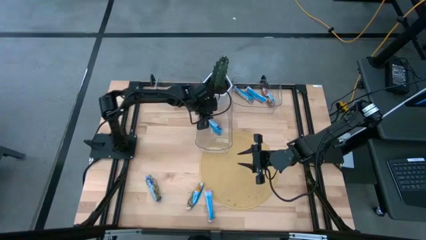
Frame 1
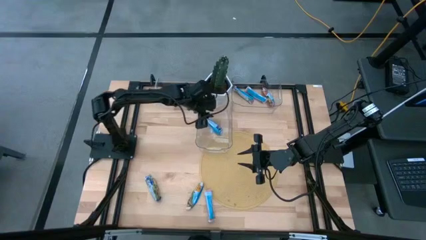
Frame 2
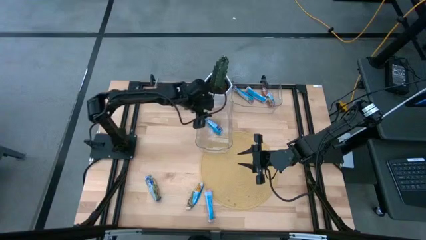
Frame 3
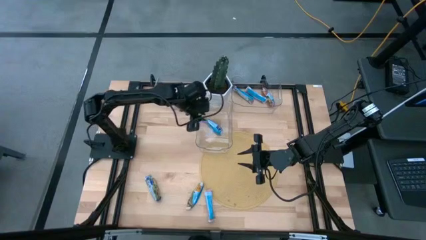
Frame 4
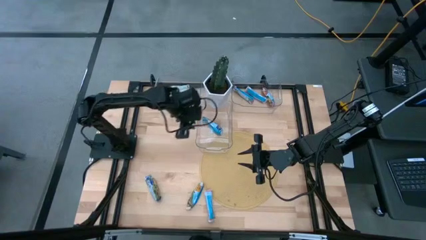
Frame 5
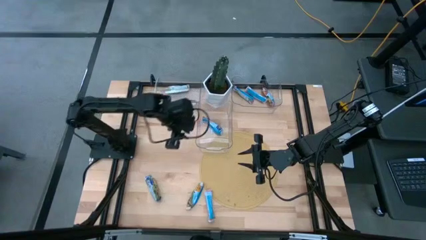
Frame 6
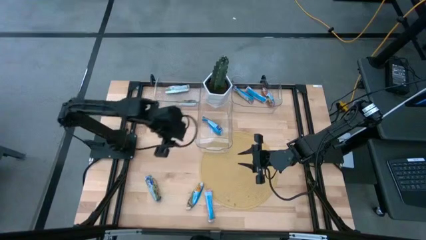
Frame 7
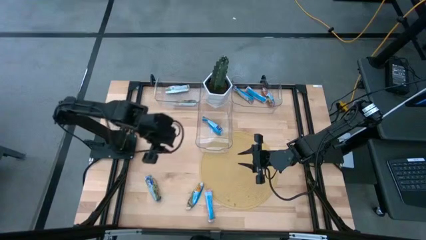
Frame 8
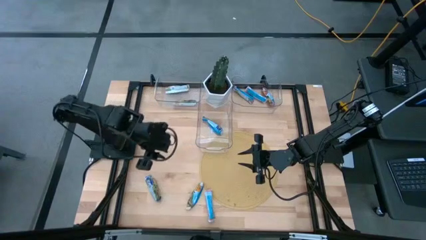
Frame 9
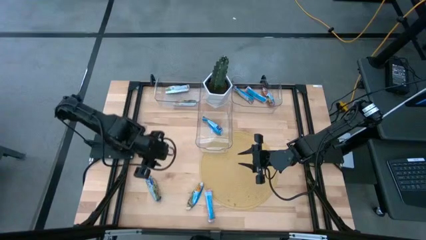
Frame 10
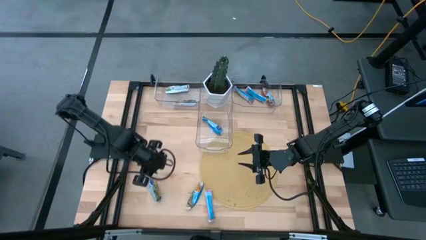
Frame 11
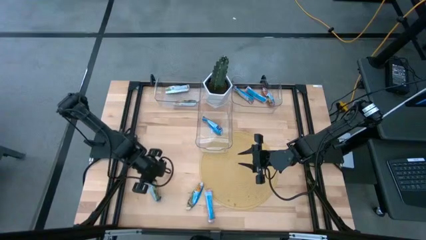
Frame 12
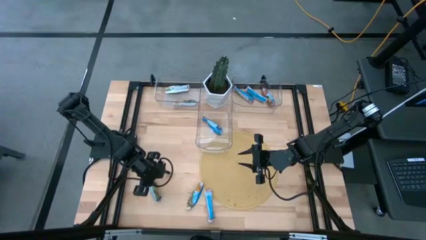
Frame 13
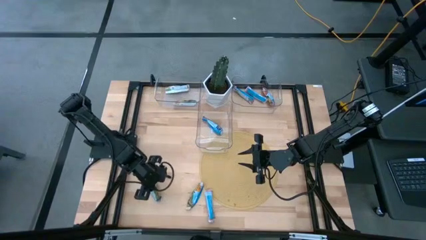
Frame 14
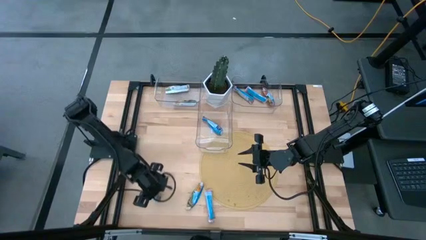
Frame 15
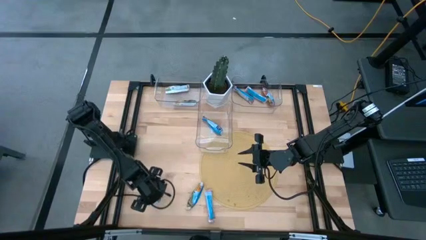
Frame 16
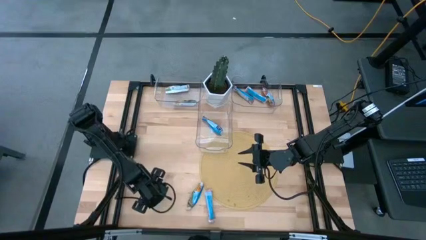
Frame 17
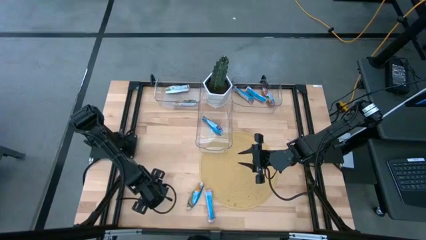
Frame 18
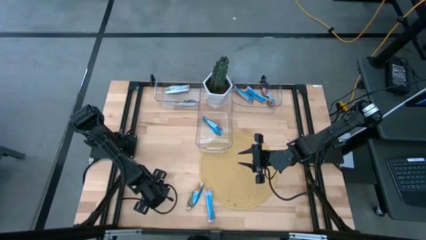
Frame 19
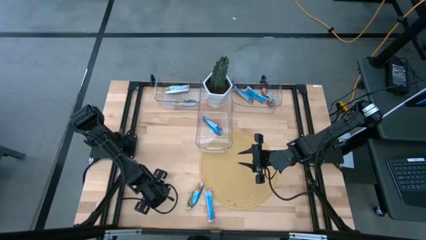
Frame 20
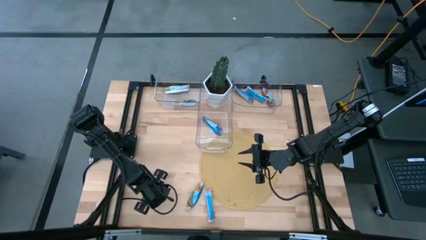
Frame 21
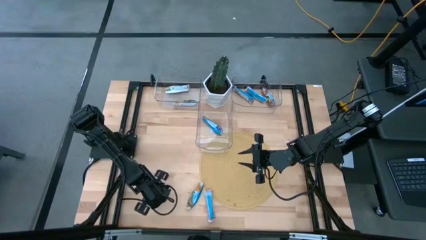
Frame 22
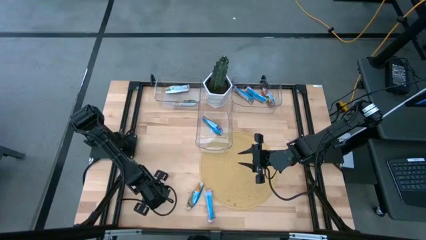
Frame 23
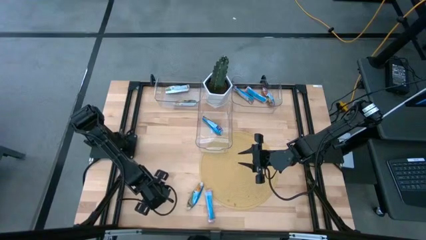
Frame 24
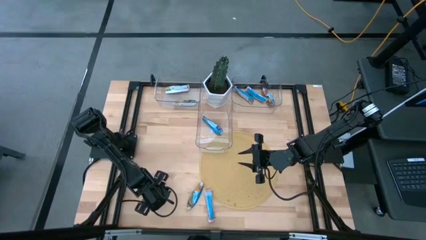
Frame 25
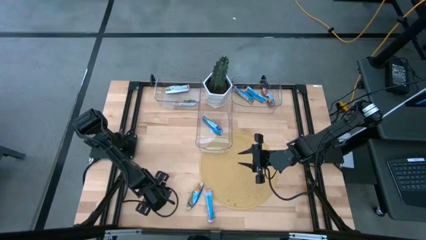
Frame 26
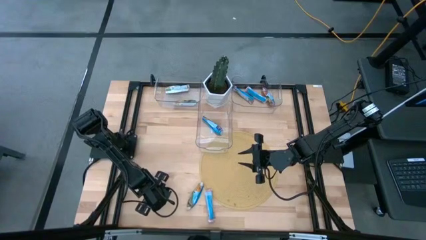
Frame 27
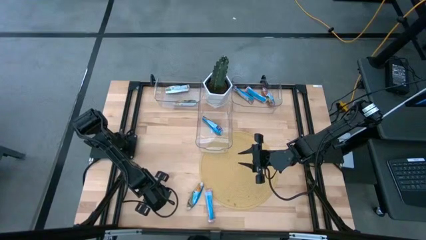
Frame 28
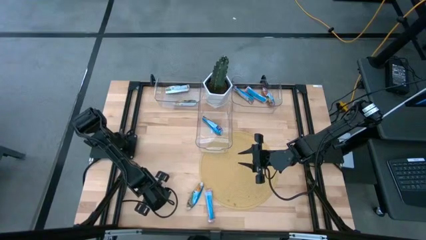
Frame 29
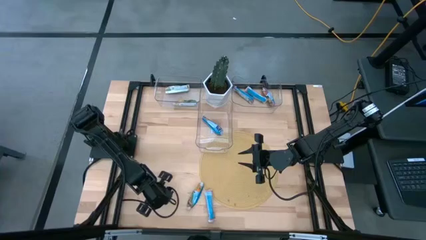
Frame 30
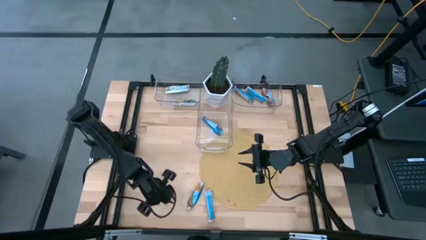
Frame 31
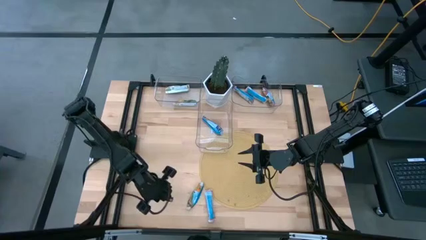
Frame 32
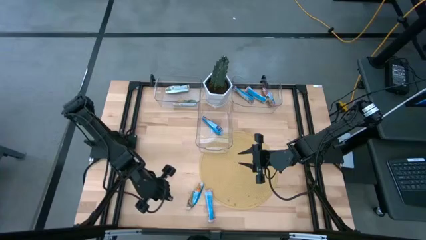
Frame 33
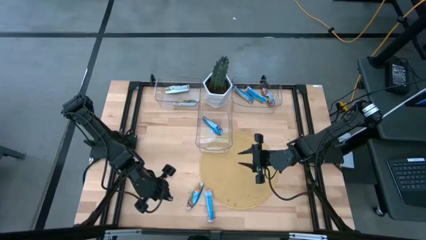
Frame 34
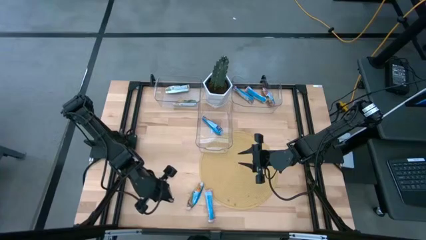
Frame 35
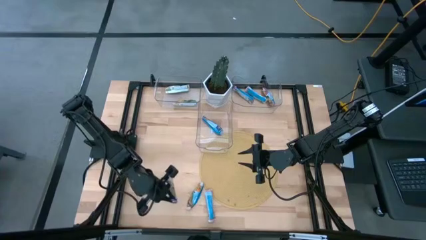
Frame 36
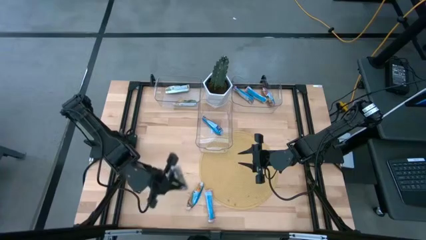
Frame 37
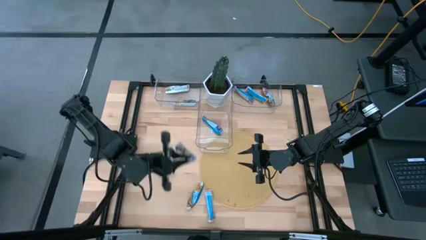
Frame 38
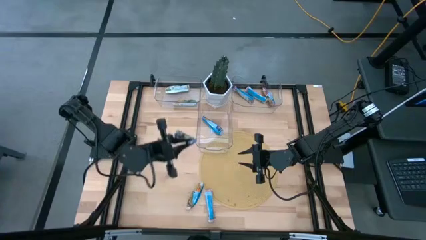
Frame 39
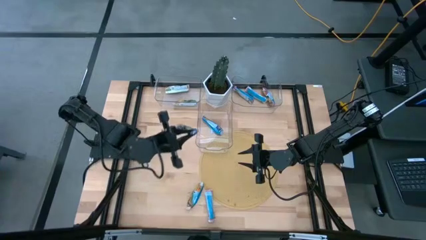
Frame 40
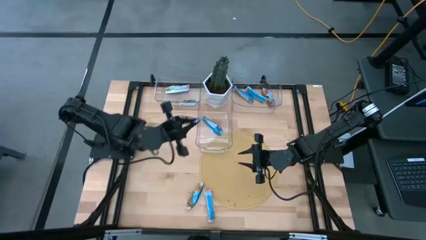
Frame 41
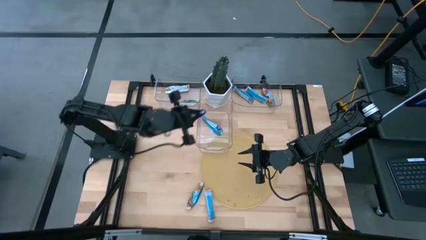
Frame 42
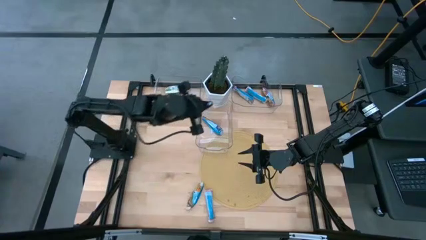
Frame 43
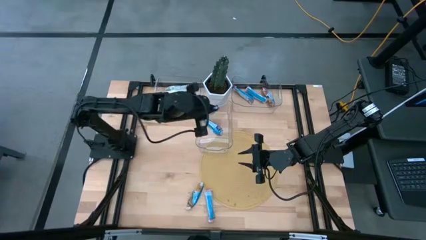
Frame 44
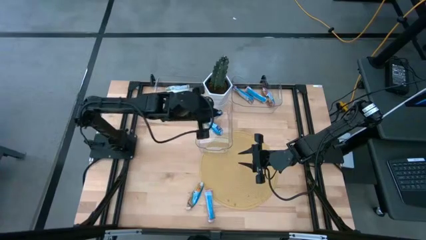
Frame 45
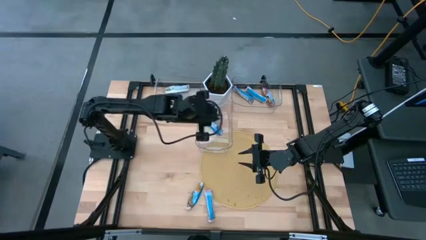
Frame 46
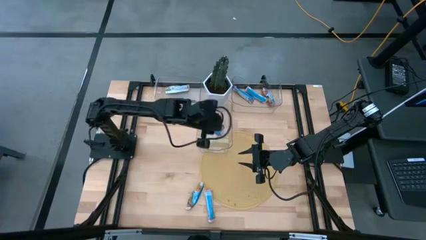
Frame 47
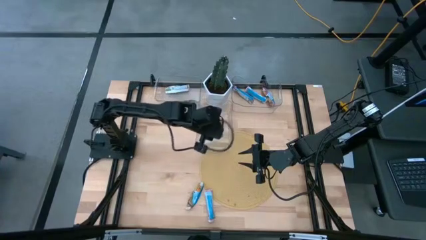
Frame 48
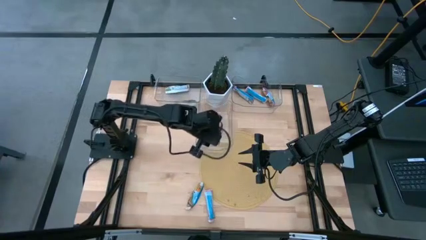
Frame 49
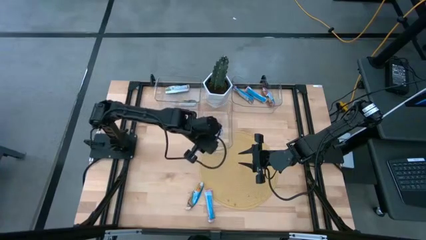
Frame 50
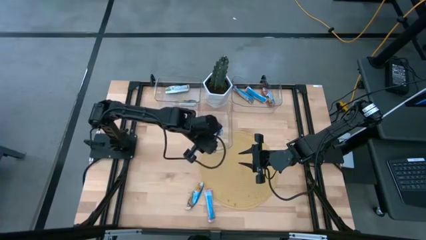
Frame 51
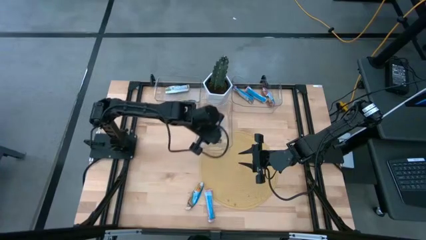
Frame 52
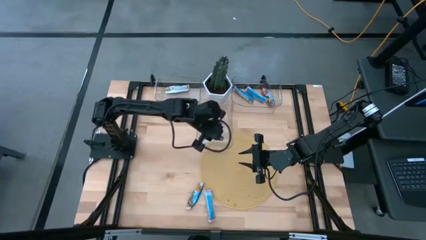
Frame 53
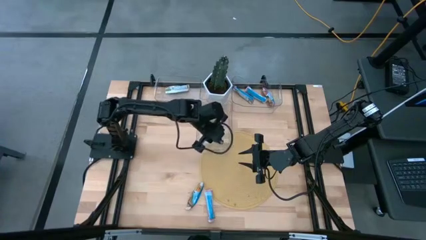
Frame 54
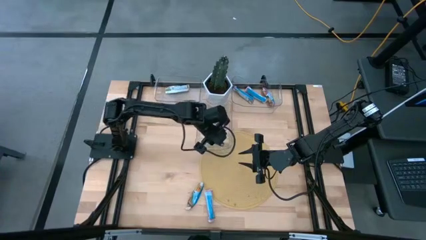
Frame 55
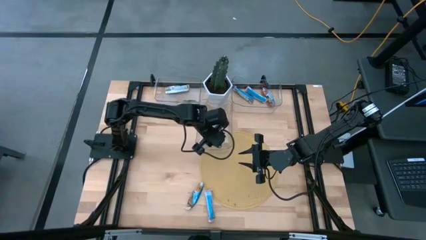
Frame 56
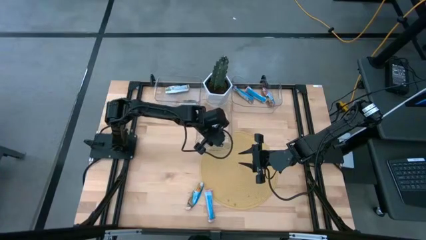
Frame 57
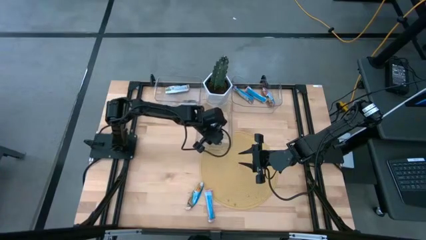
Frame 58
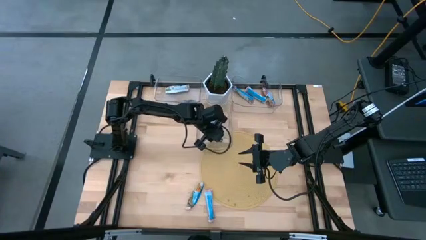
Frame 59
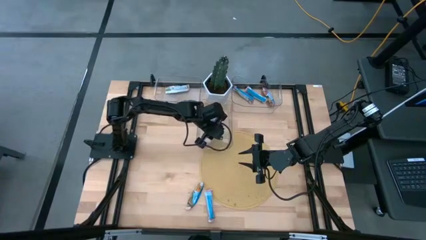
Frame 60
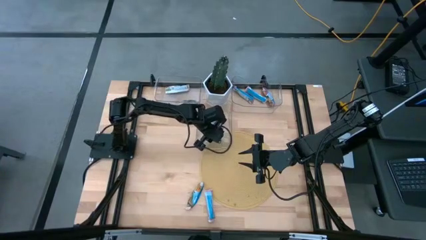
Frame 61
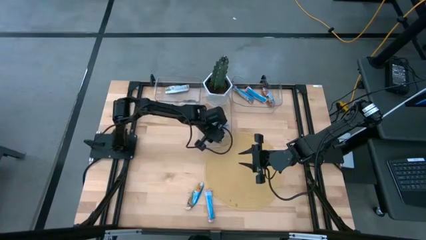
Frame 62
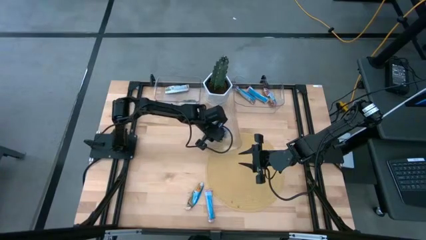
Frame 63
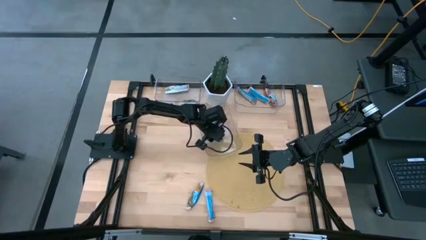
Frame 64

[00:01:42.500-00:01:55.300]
Task: Pick and place Granola Bars by type
Put the blue green granola bar into the middle transparent bin

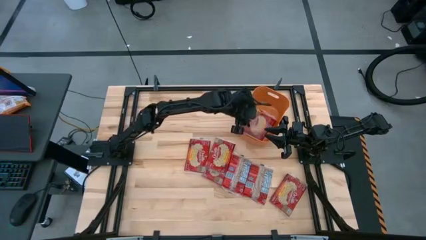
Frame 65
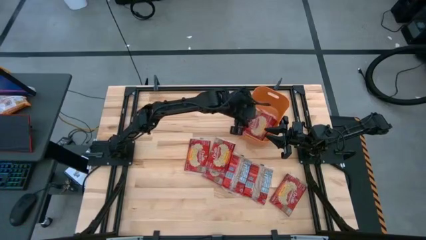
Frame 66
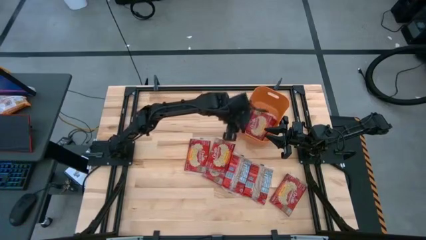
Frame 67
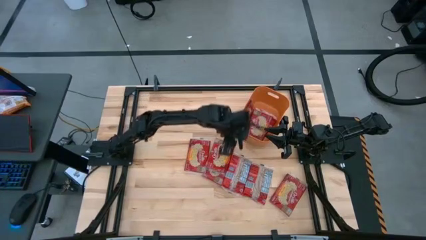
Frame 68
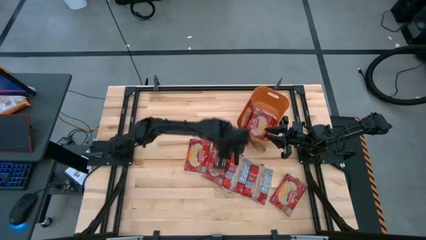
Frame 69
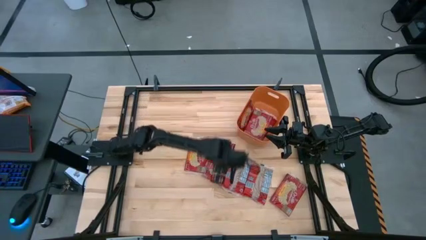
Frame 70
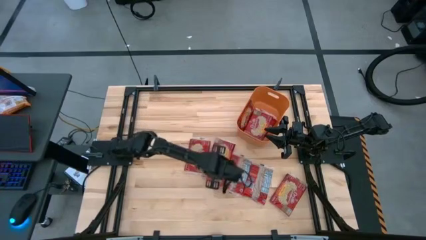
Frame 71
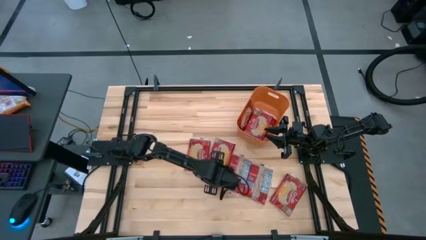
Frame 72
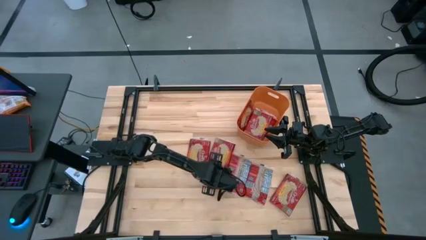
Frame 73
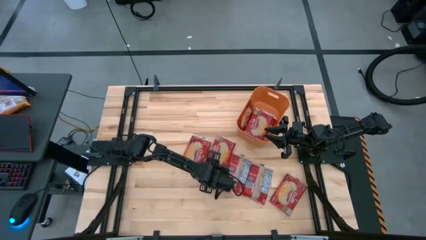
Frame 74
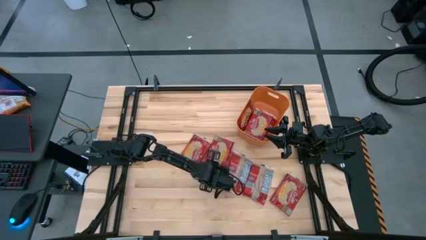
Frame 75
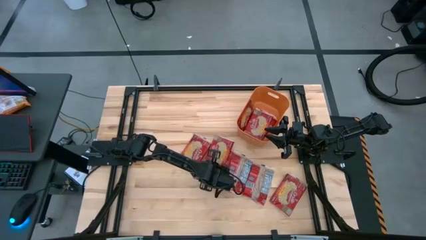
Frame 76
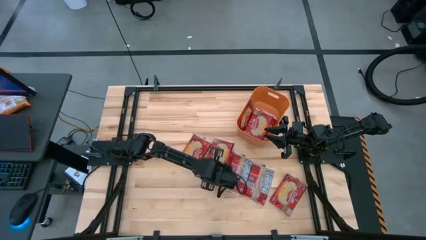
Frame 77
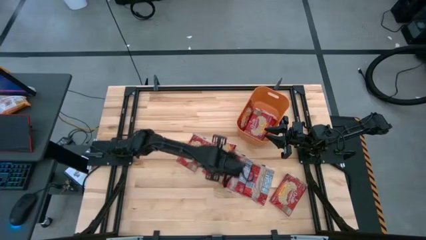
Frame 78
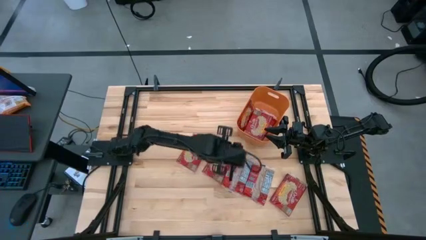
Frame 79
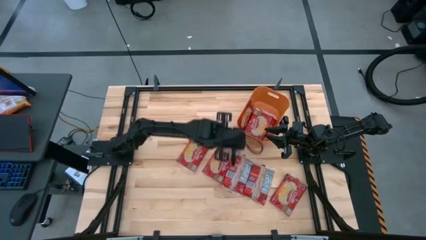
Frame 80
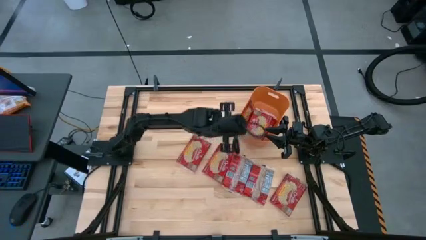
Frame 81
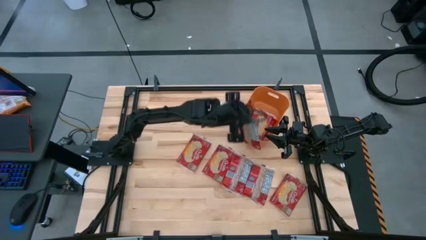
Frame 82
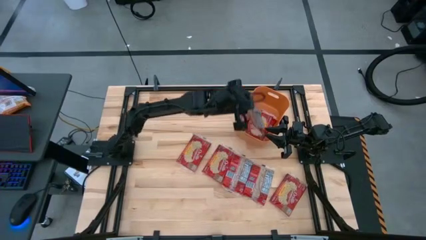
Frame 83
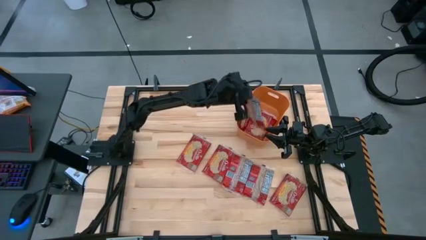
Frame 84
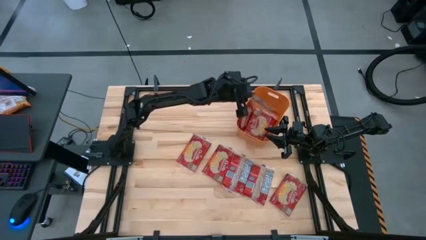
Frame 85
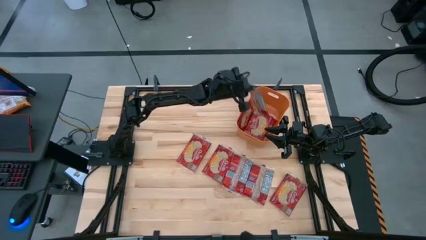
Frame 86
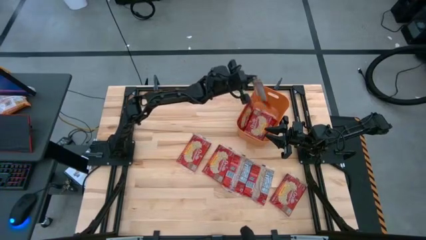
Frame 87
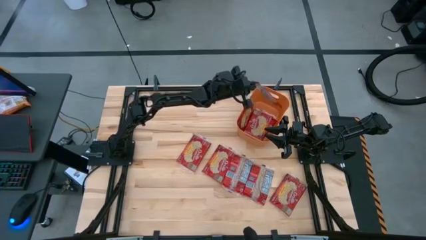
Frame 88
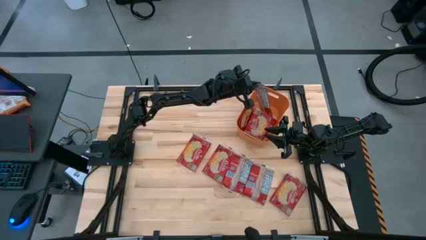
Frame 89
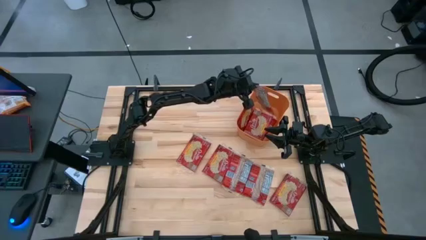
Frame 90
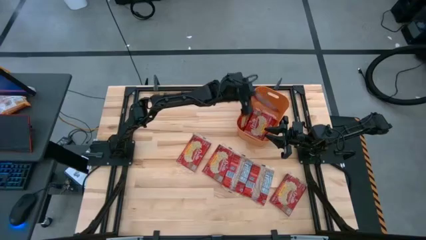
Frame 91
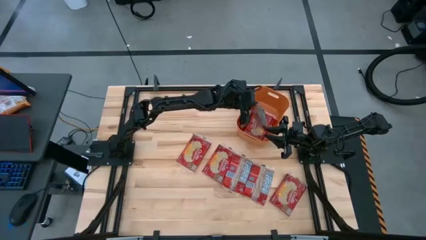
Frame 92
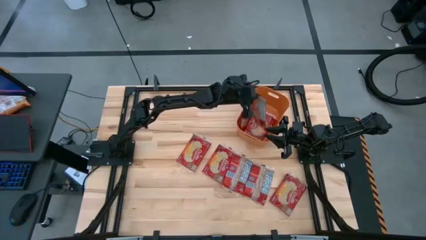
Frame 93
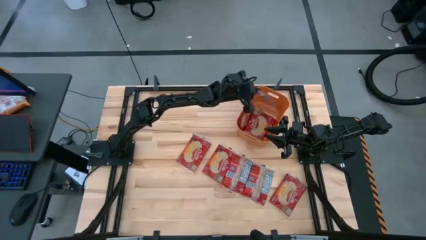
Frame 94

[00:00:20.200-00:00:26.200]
Task: Sort popcorn bags into baskets
Put the red popcorn bag into the orange bin
